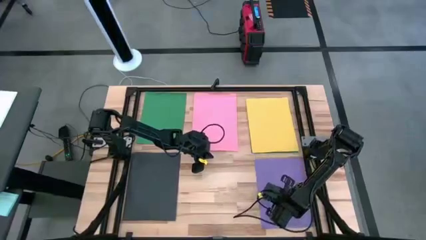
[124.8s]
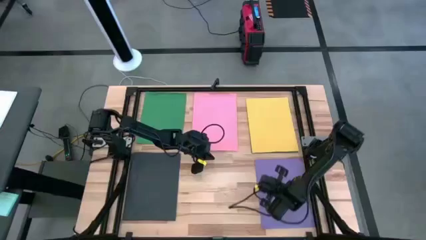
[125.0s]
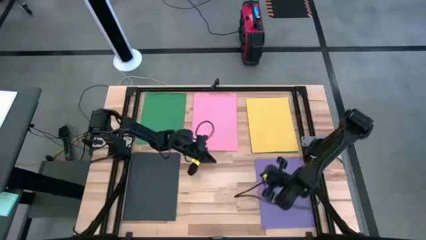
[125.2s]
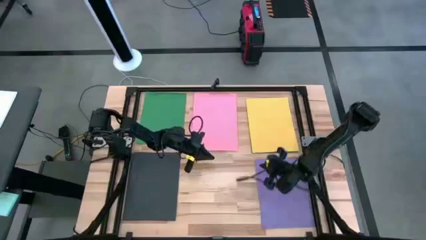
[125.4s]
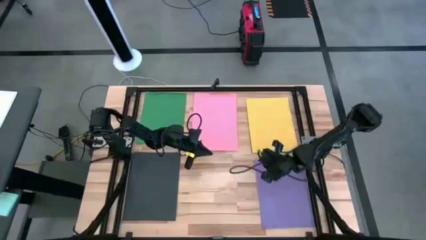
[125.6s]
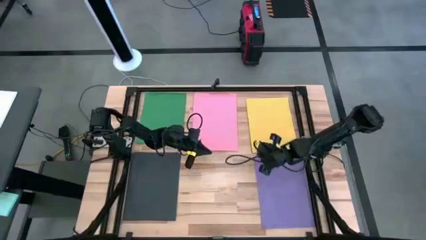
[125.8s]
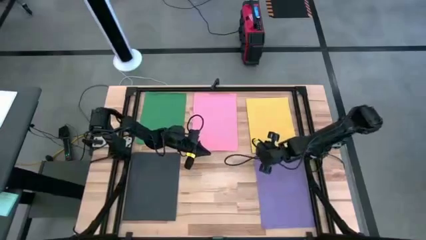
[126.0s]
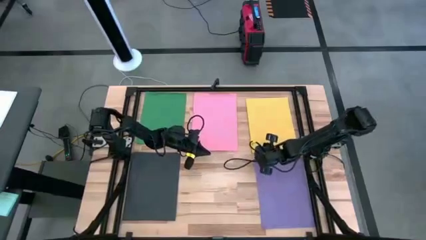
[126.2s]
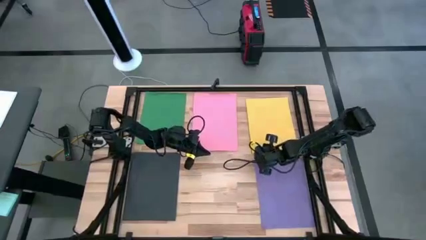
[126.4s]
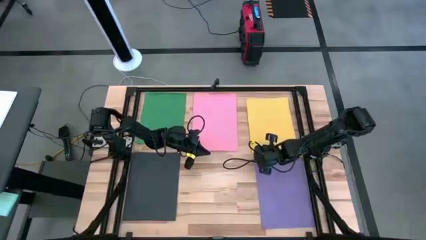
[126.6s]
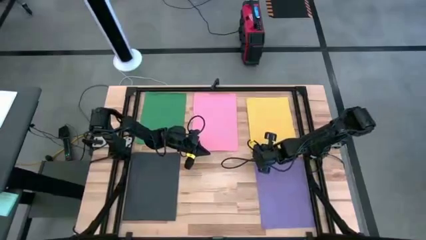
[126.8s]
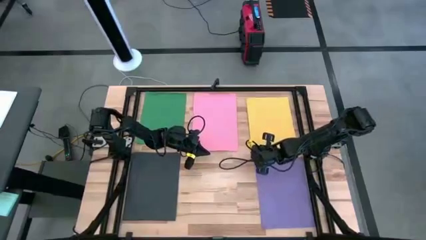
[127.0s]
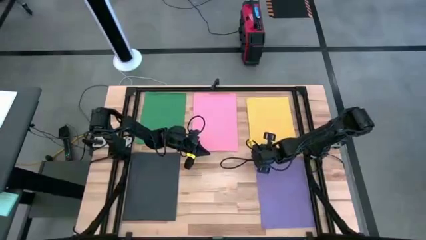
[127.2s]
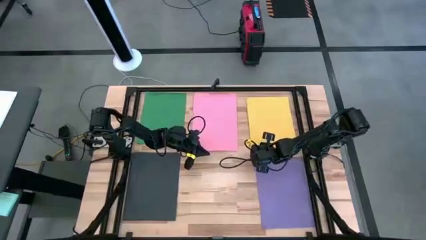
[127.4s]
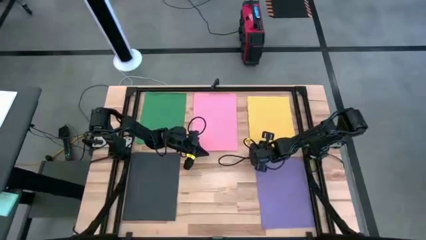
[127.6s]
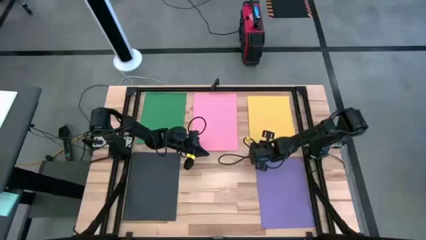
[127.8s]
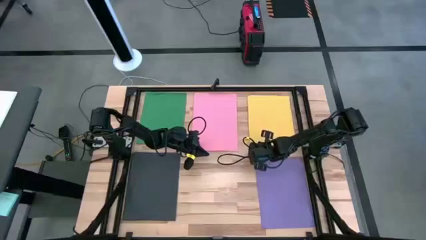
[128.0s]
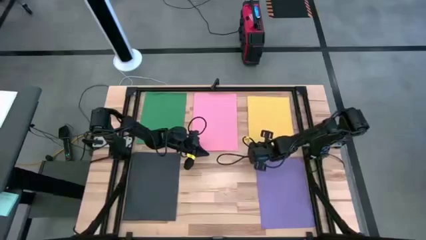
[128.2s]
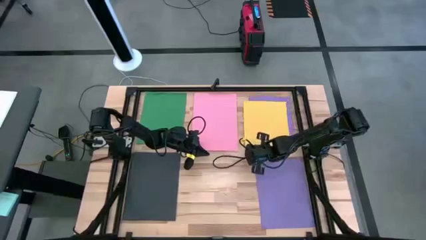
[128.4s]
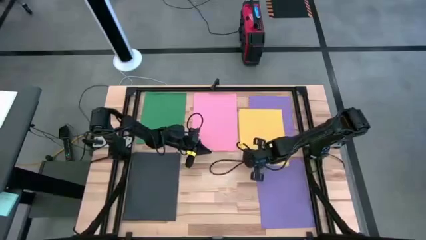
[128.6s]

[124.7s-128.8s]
Task: Organize paper
Move the yellow paper to the bottom center of the table

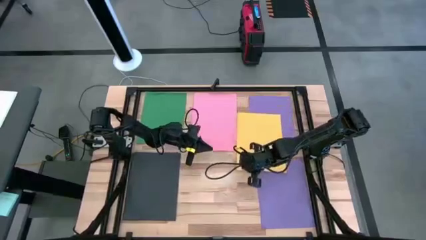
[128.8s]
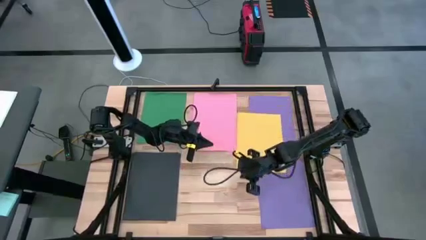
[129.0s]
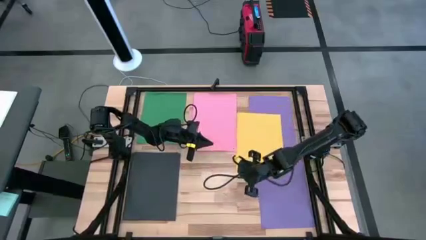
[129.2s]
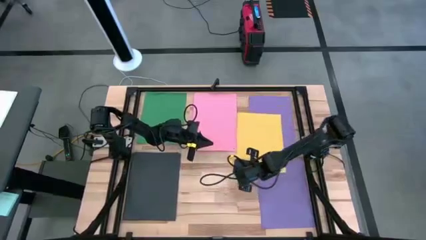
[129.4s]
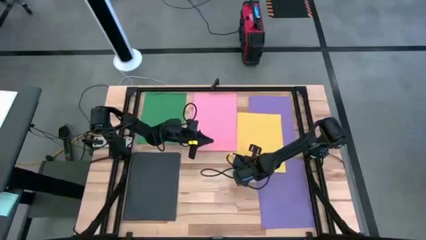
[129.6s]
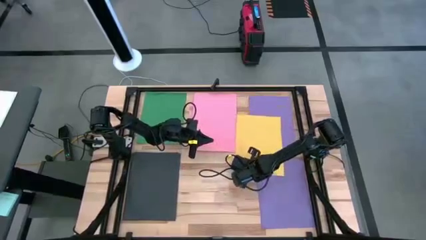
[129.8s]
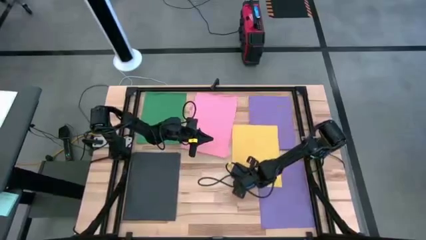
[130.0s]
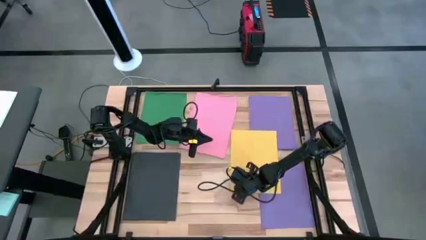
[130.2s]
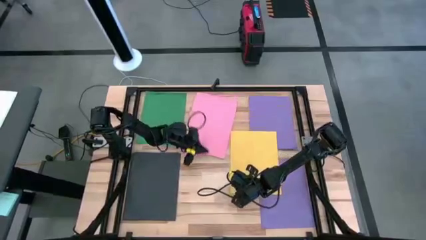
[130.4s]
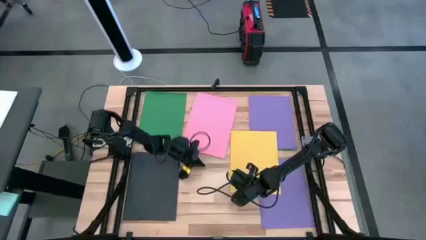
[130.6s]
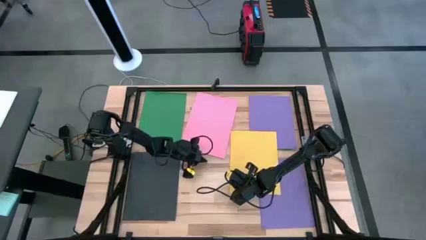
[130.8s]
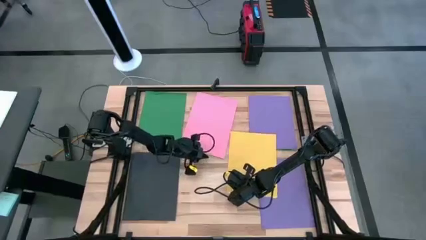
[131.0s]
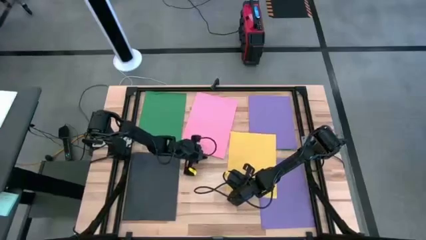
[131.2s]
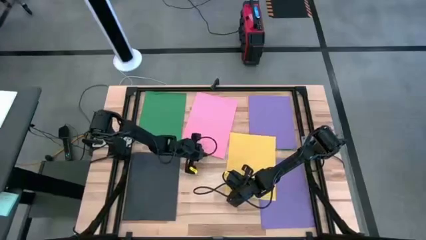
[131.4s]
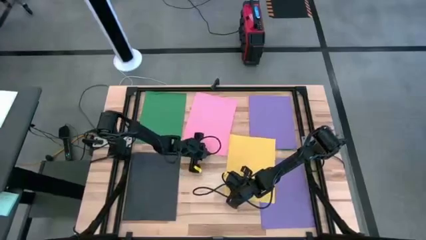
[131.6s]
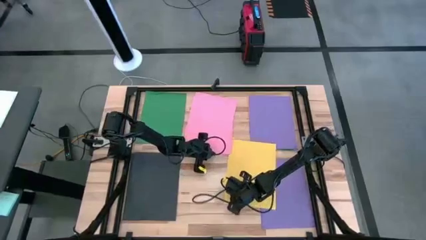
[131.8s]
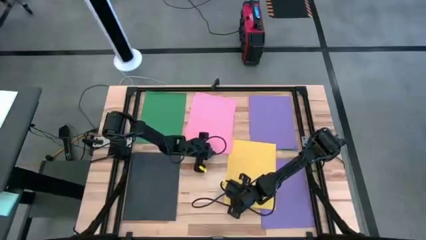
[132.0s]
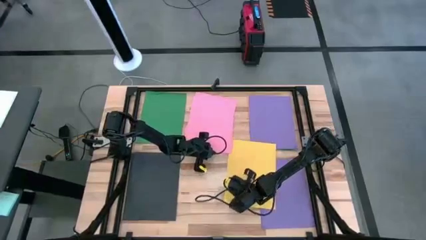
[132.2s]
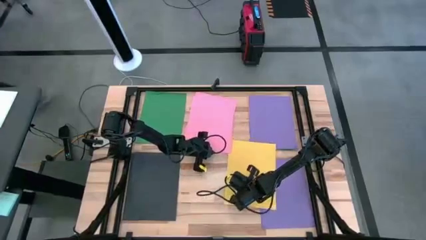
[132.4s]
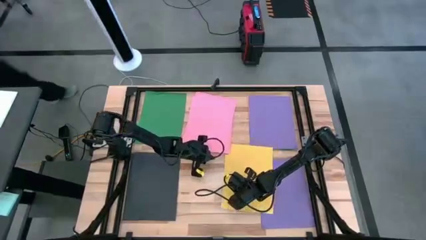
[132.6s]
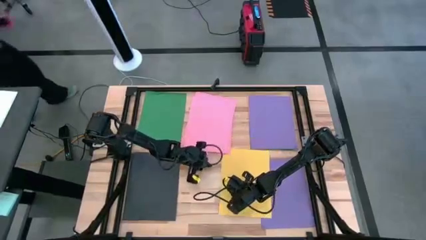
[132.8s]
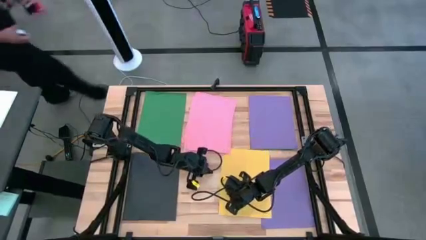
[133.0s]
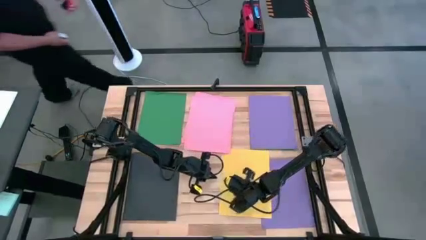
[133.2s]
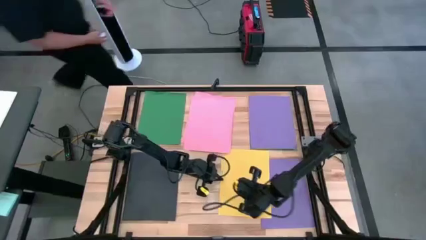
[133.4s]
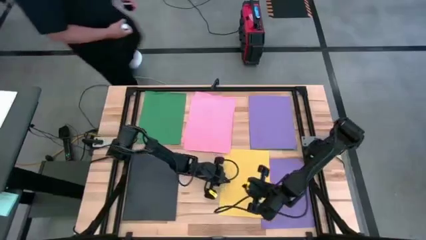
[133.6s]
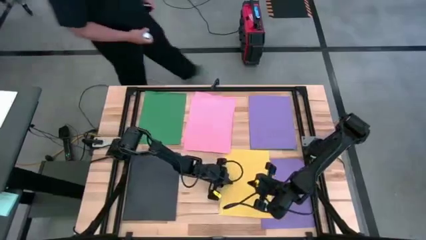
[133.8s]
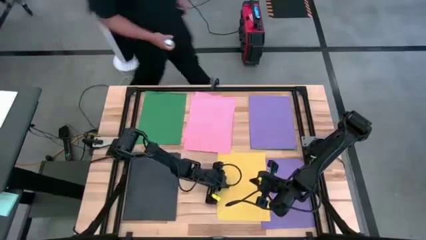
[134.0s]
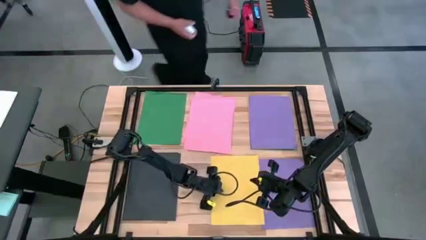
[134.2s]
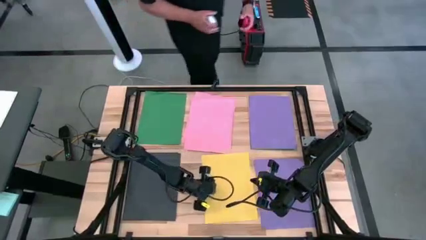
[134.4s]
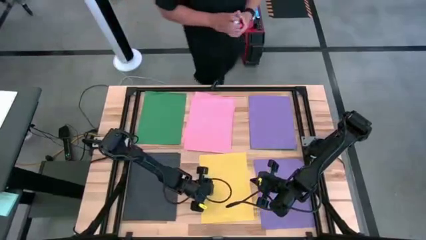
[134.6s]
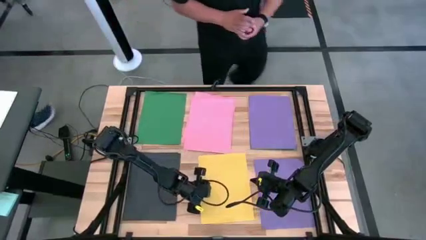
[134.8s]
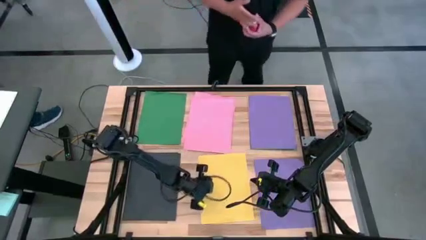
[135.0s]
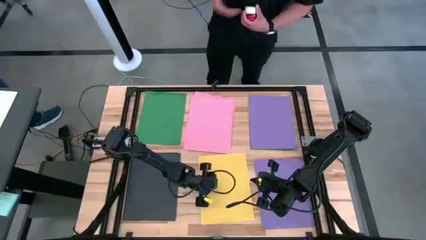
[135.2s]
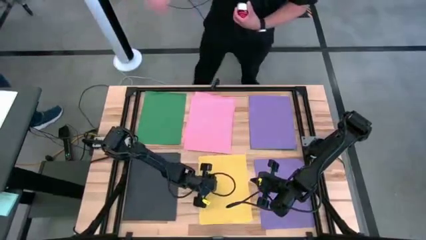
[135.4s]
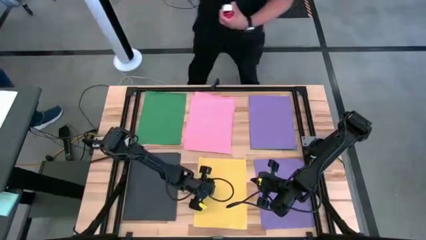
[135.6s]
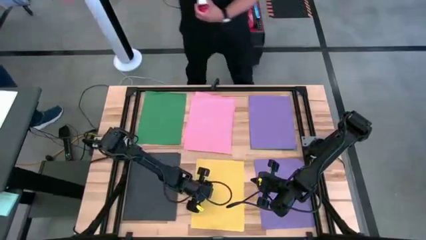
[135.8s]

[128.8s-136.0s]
Move the yellow paper to the bottom center of the table

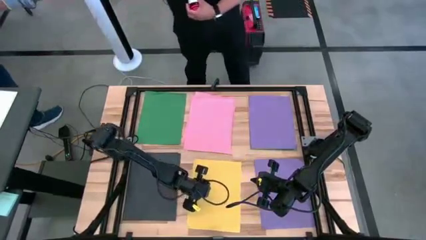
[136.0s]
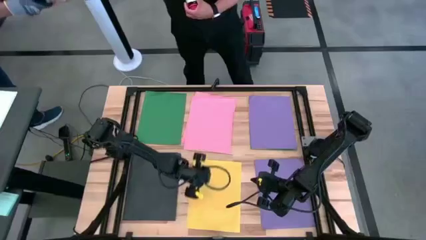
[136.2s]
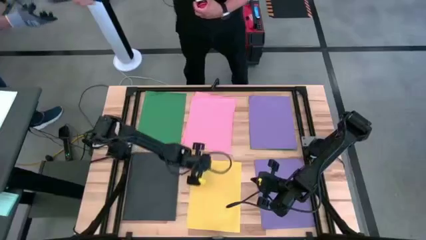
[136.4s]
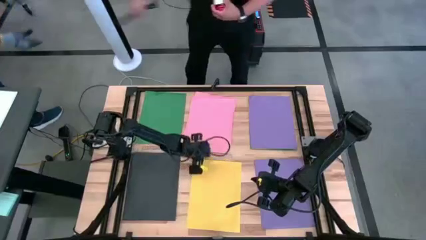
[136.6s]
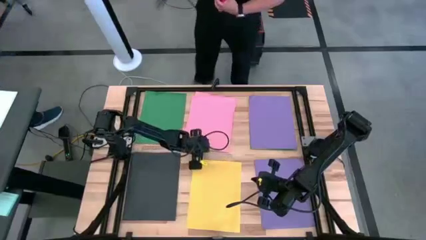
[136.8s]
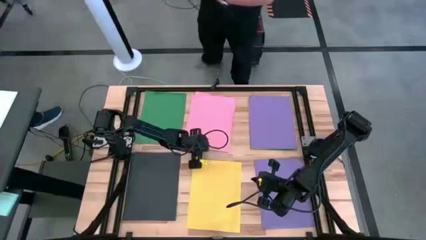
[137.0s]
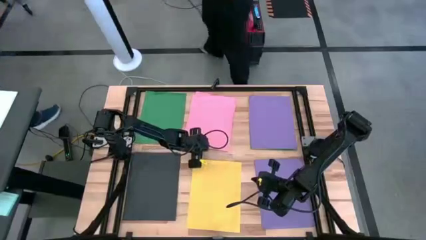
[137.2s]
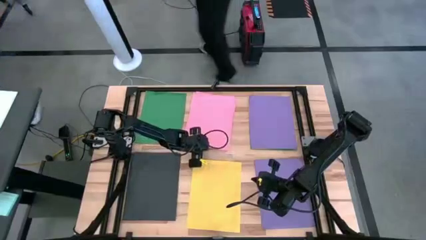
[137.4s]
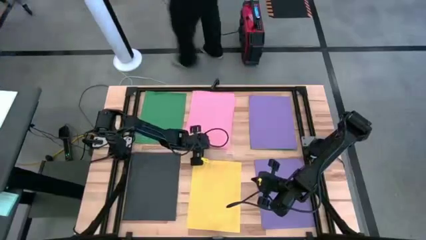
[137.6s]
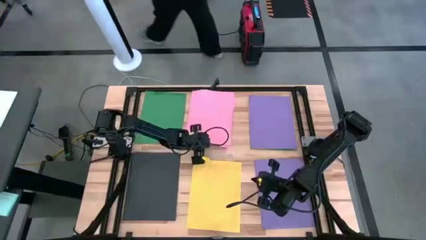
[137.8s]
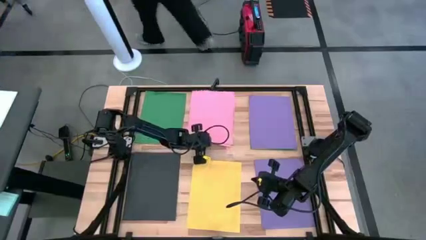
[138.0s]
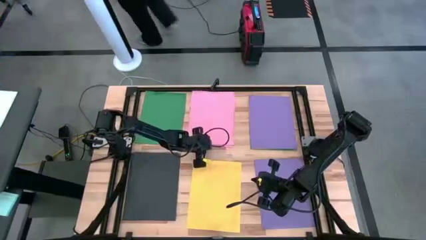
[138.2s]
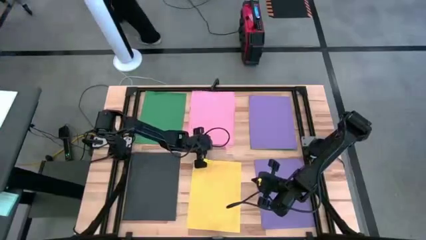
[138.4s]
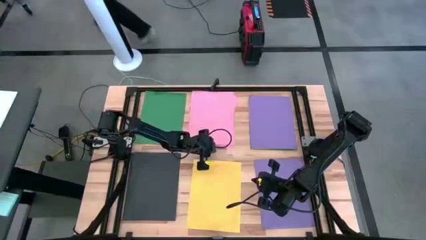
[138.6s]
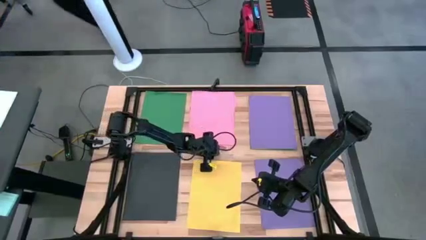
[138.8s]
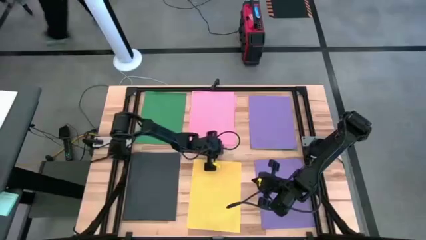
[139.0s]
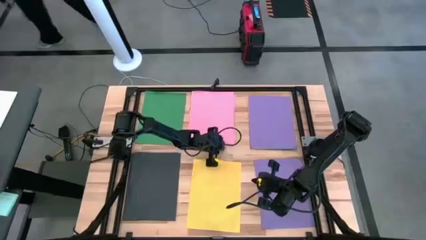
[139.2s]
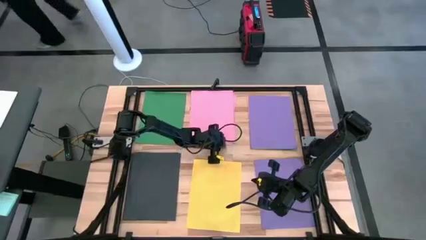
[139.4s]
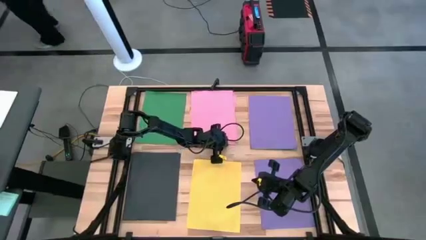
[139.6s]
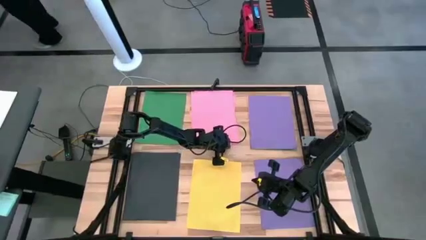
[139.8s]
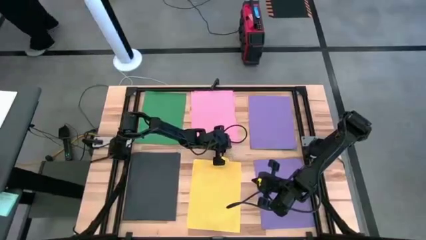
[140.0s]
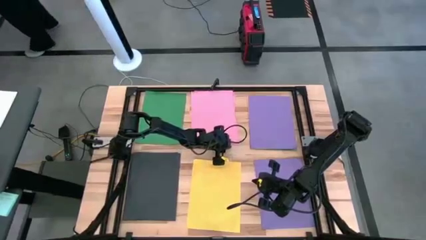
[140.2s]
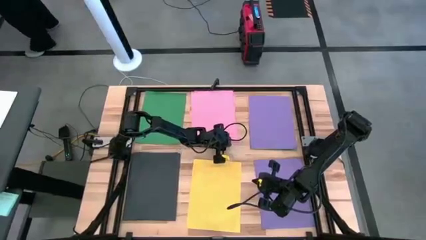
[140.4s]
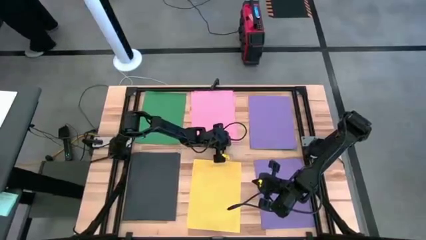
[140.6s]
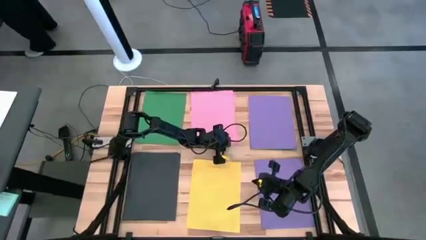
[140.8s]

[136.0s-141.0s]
Adjust the stacked pink papers
